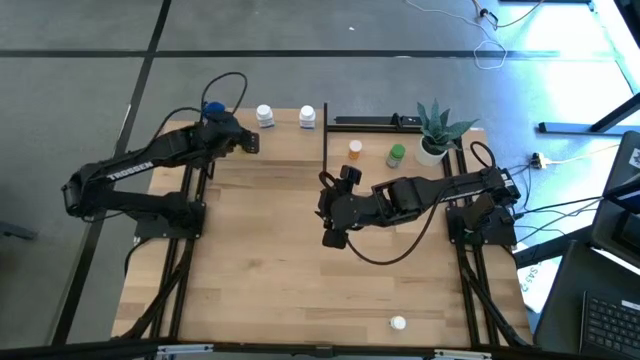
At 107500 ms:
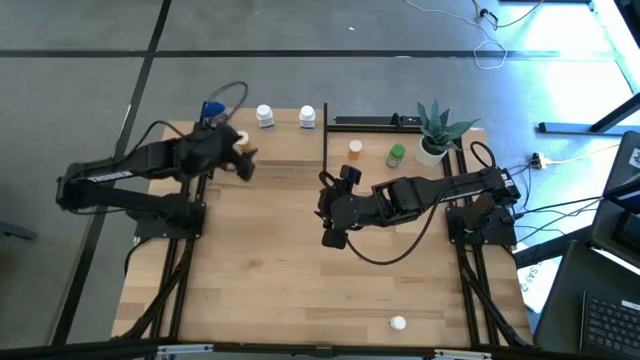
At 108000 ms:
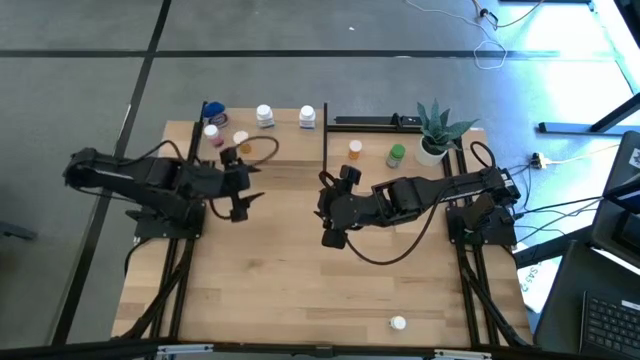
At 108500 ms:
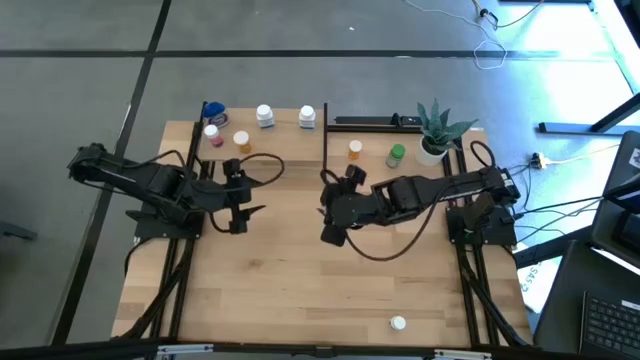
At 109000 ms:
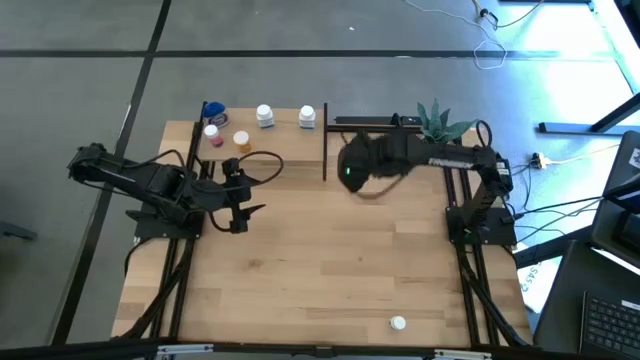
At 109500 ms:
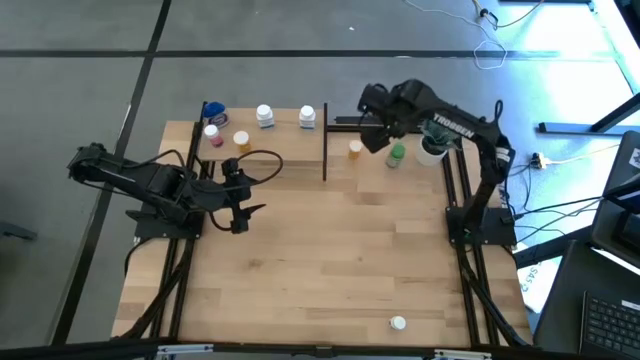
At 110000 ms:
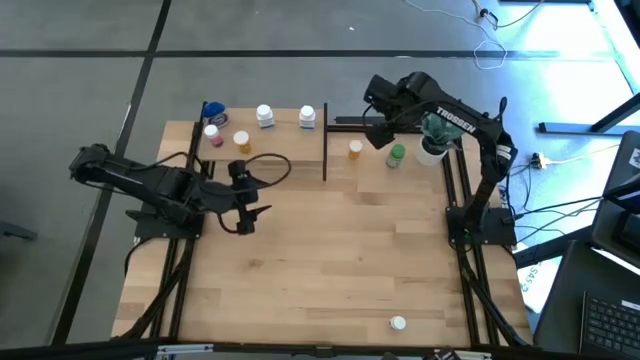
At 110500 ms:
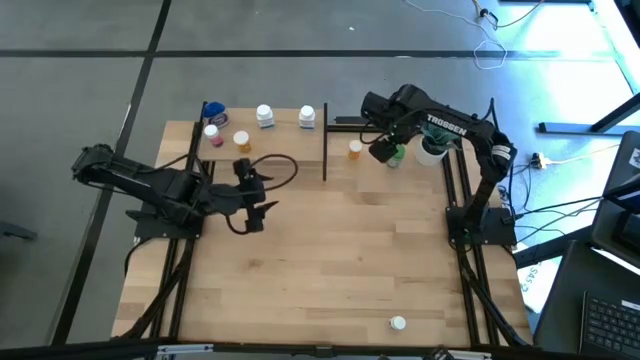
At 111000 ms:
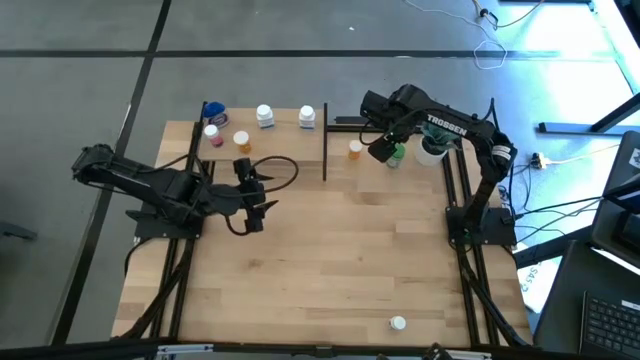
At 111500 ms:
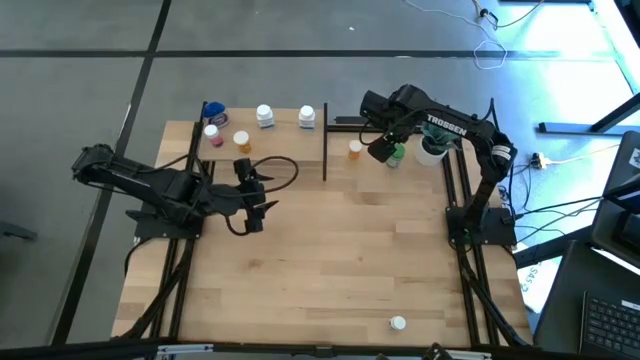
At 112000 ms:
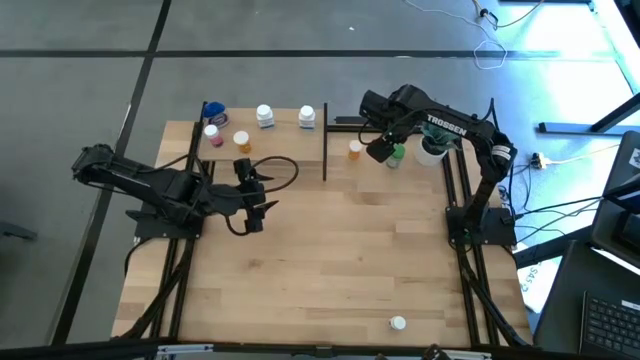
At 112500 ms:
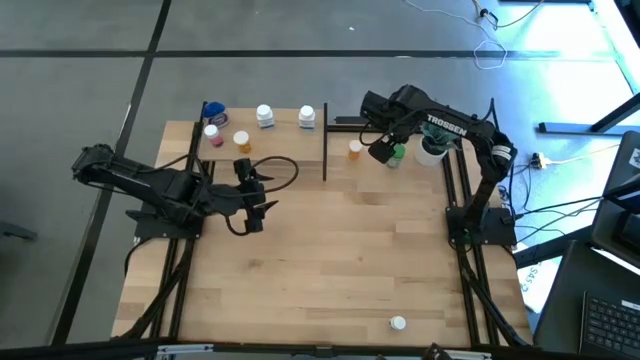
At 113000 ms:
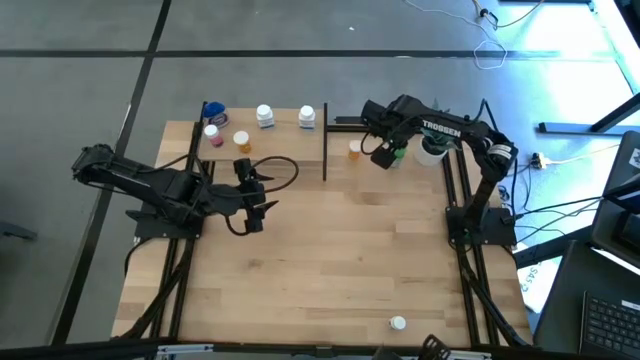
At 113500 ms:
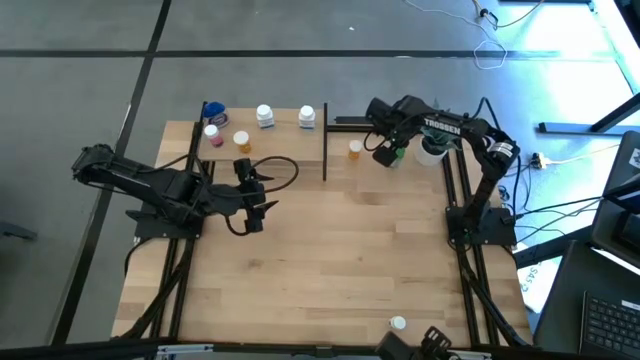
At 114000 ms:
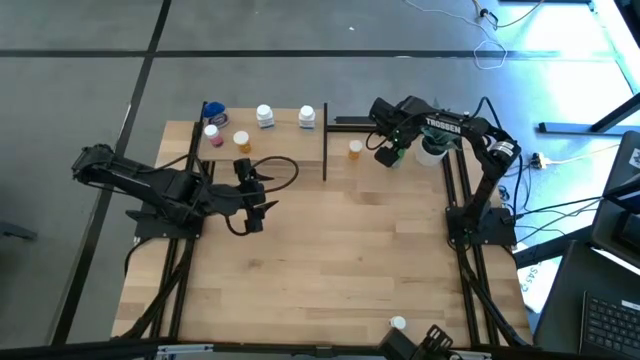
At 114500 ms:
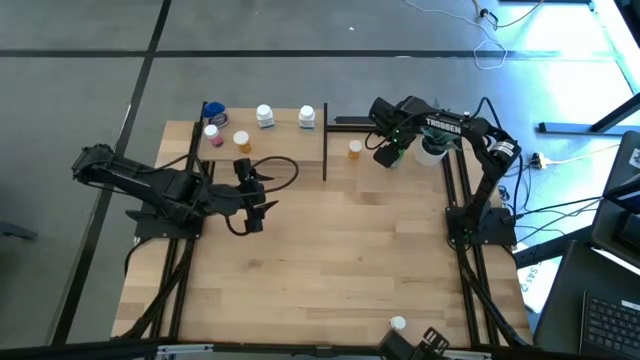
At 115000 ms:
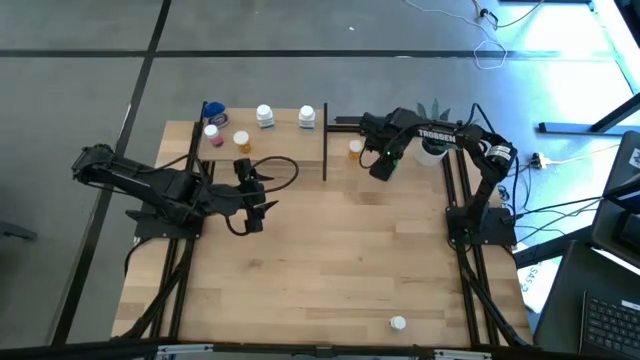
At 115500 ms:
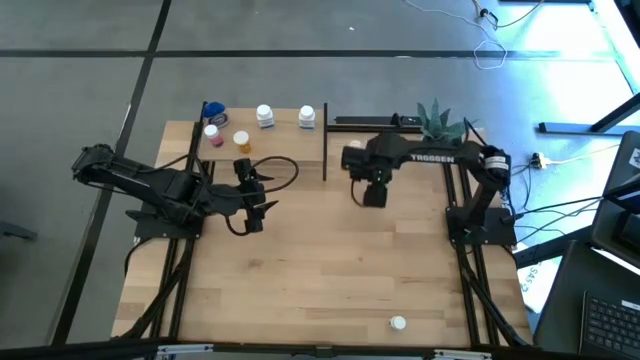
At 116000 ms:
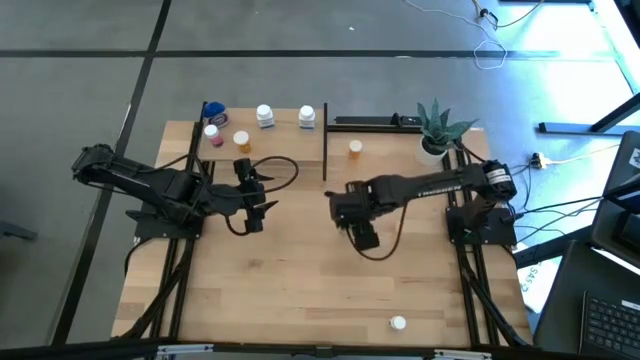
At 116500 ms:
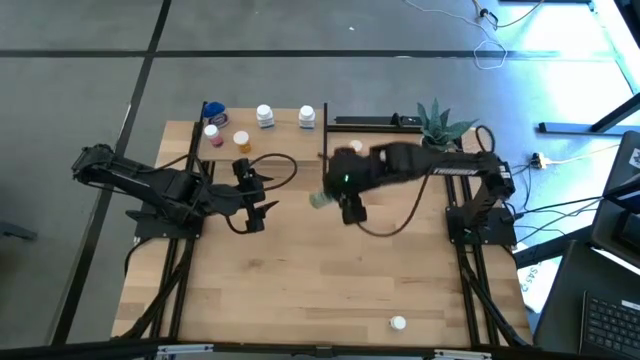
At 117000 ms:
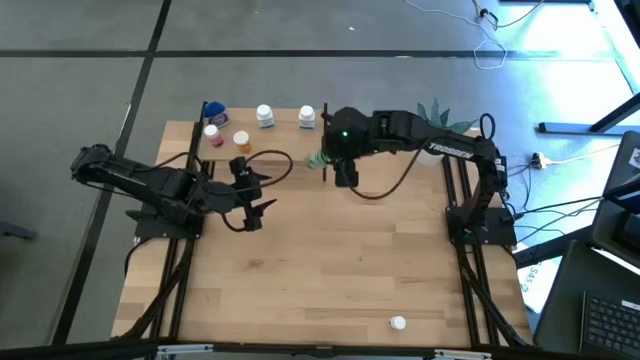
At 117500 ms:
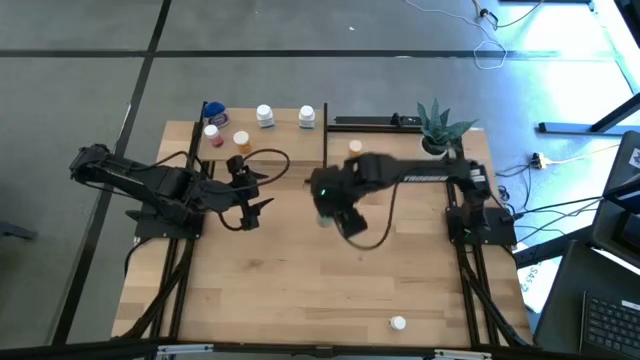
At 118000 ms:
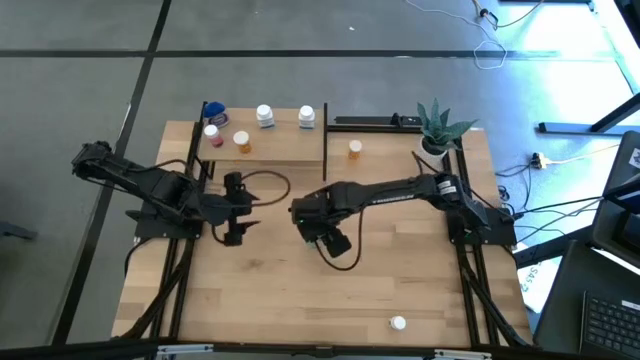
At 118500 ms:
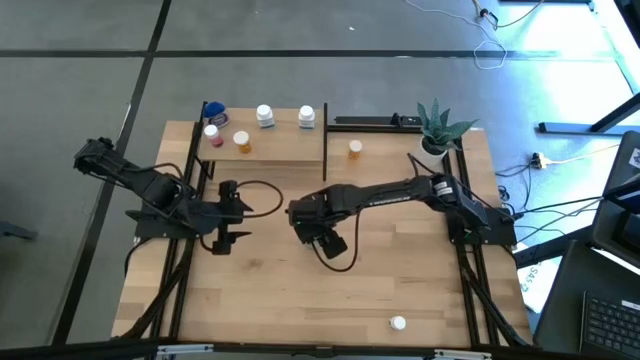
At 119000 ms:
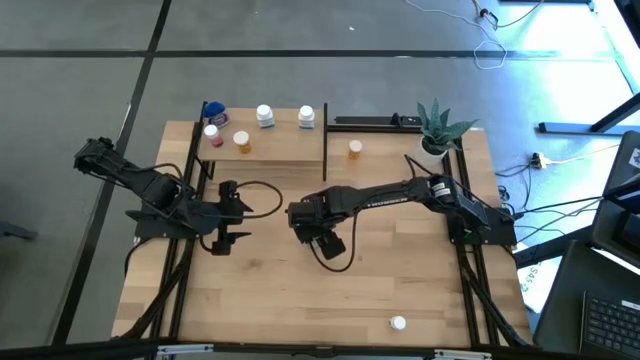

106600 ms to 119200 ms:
Task: Pick and place medicine bottles onto shelf by color
Put the green pill bottle on the shelf

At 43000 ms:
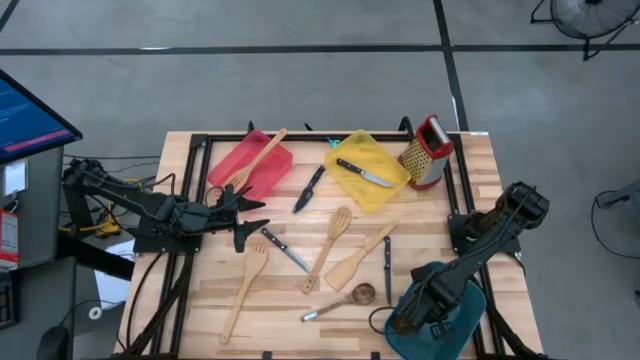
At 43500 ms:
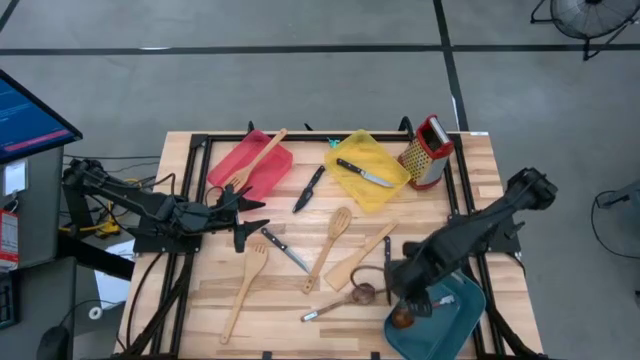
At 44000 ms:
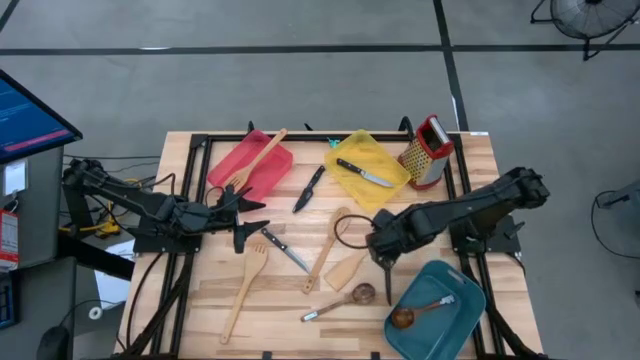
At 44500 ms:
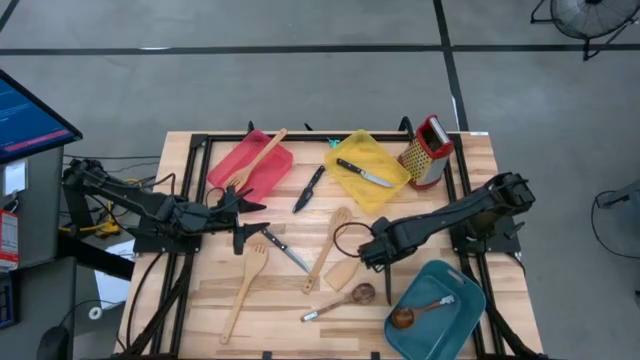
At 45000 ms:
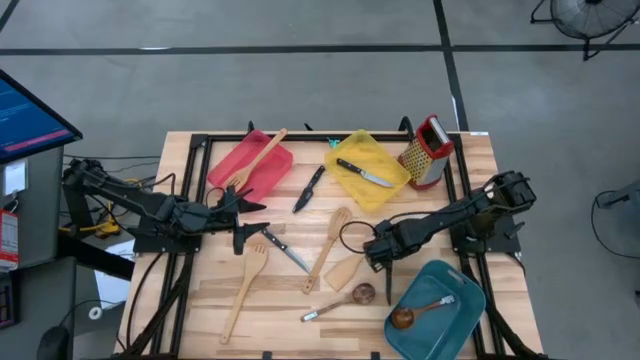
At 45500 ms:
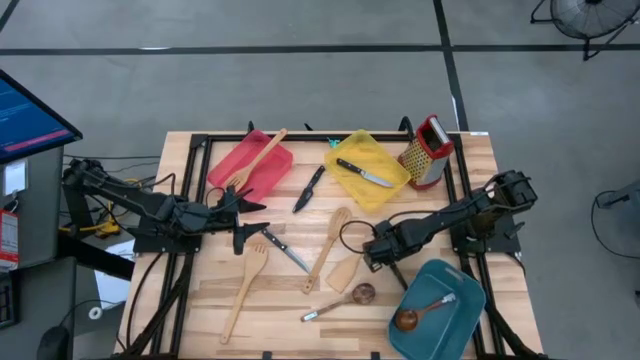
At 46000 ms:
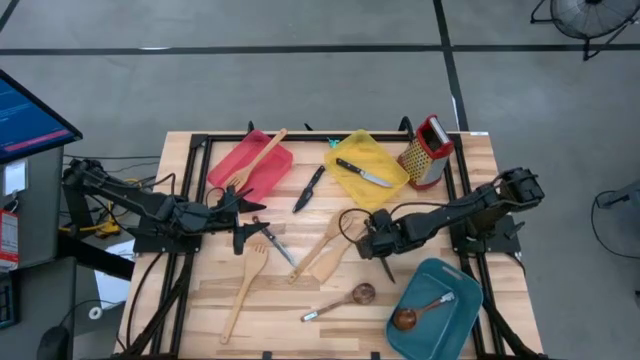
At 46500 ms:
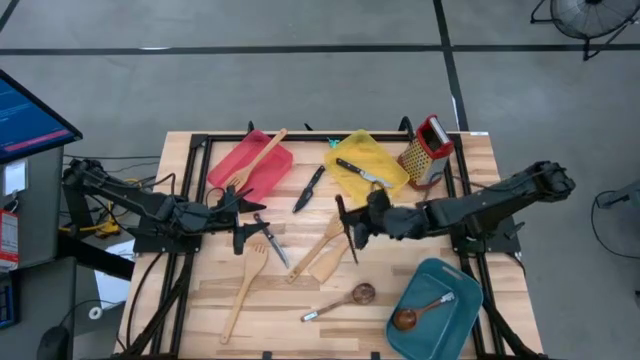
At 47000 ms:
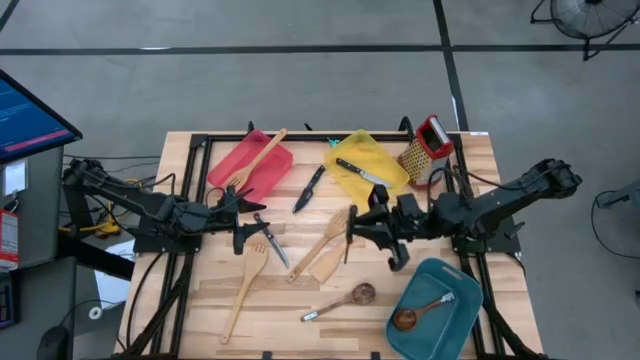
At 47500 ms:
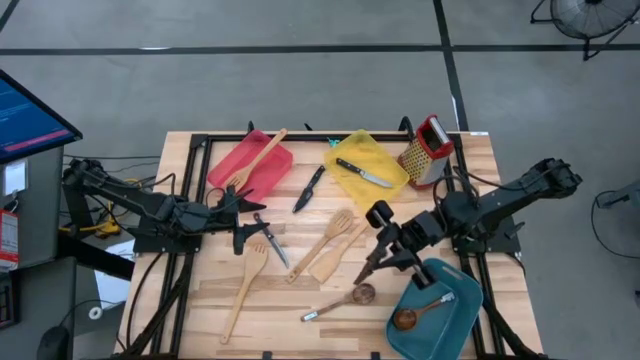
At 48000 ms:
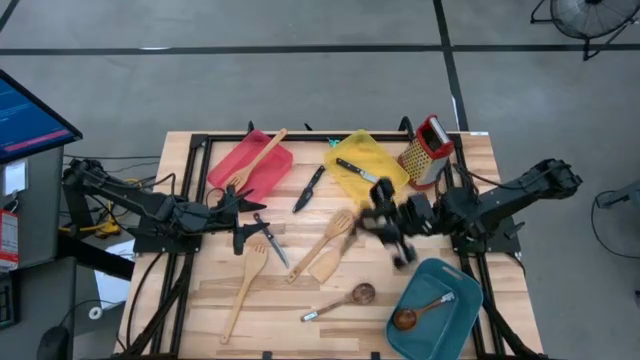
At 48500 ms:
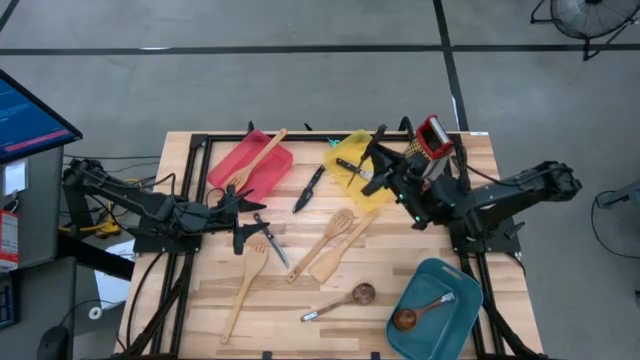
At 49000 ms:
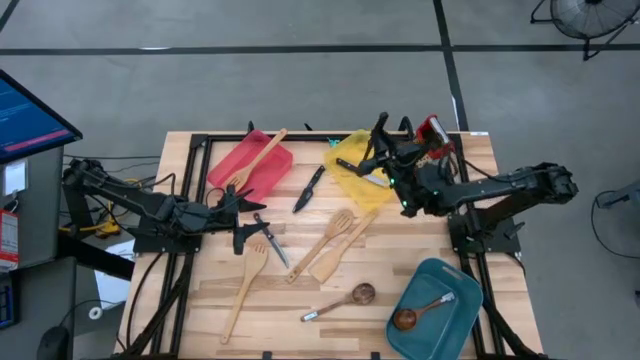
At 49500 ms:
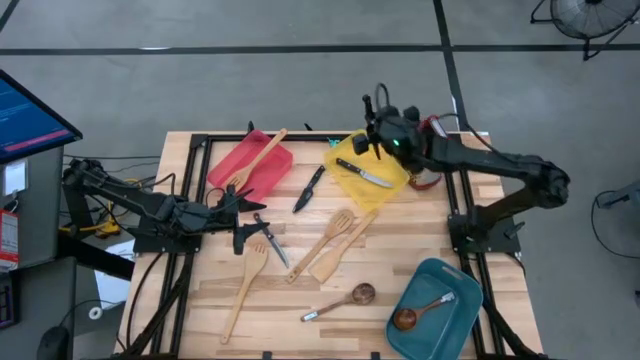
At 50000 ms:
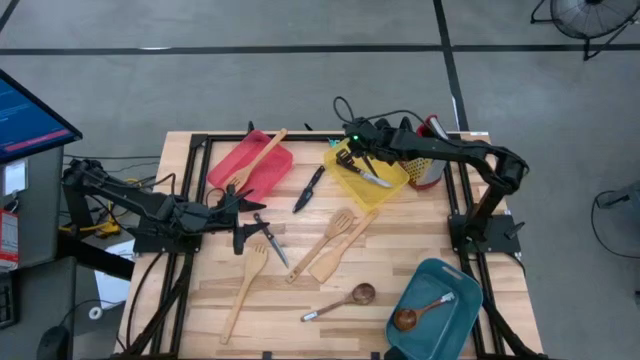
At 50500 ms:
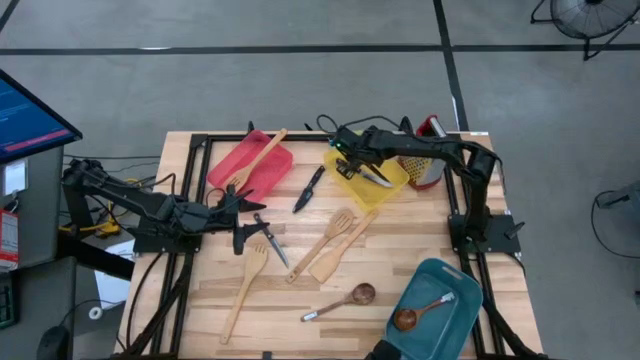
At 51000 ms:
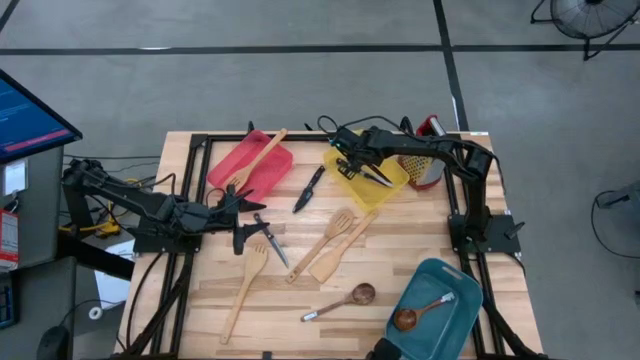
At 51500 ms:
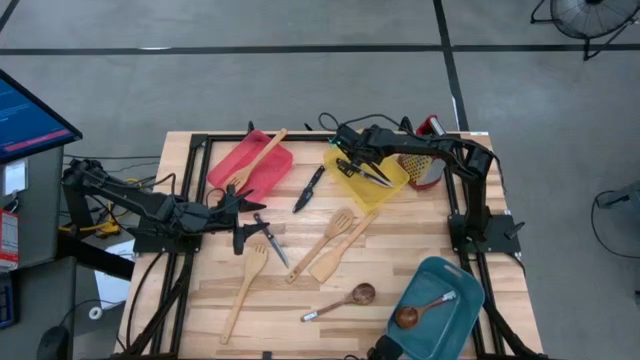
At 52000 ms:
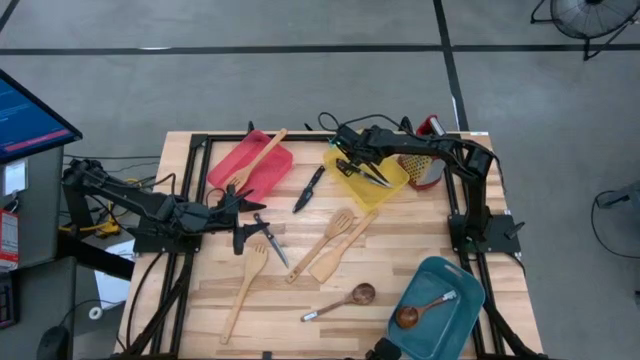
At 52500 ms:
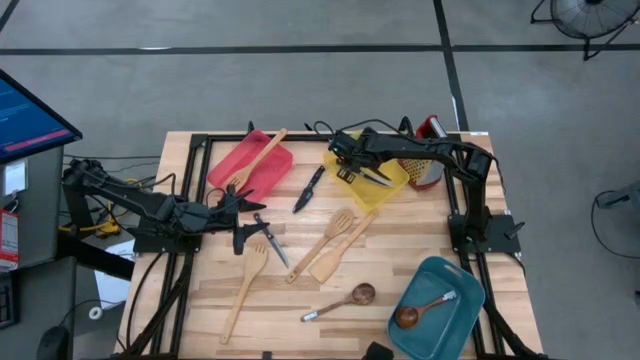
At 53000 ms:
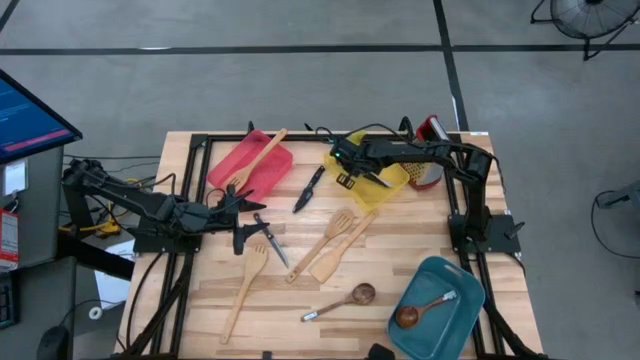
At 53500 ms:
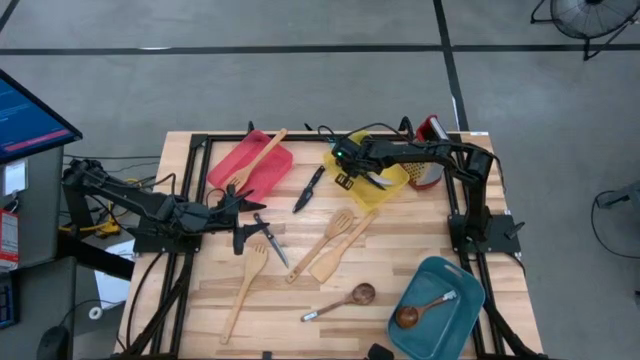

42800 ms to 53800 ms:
Task: Pick & Place Kitchen Items
Put the right black knife into the yellow bin
